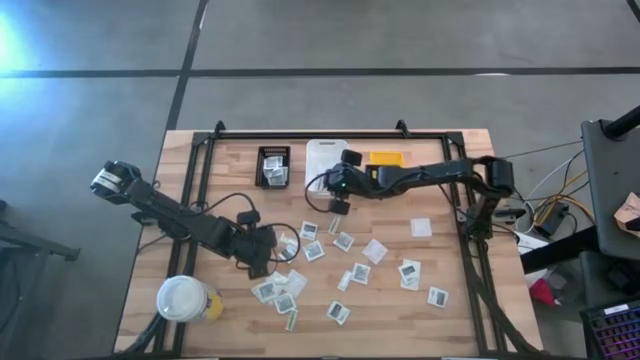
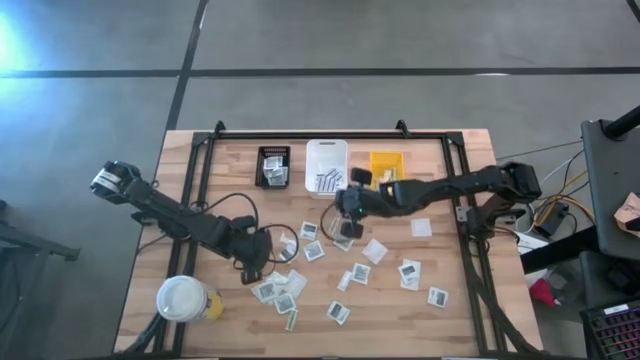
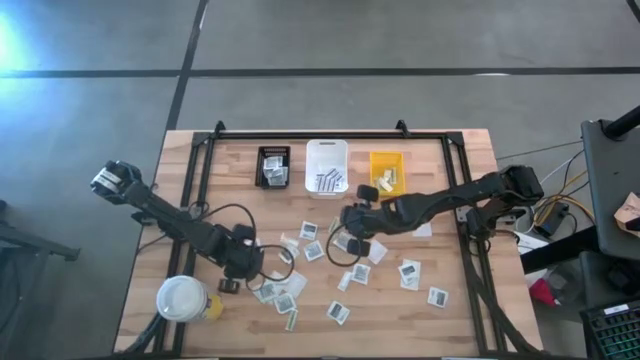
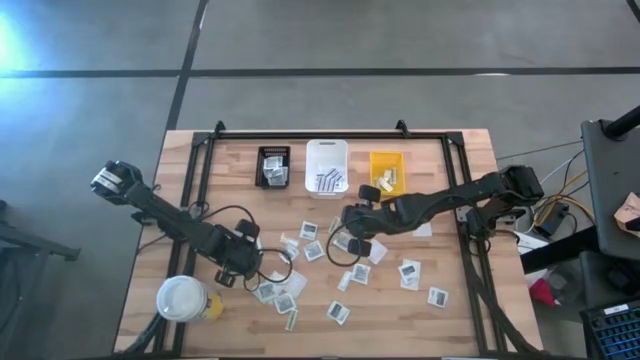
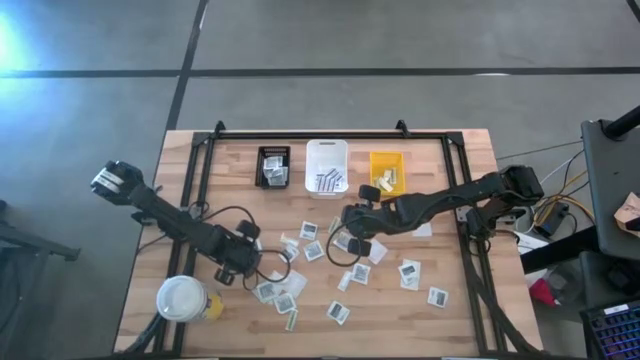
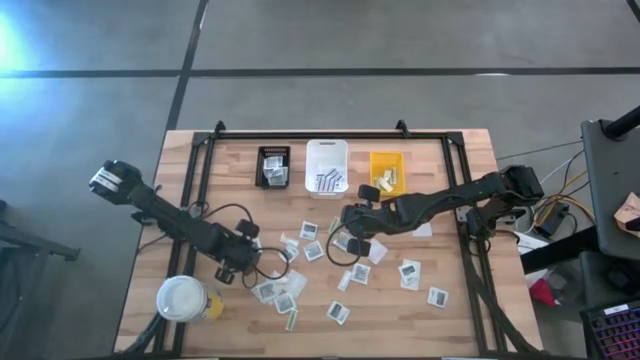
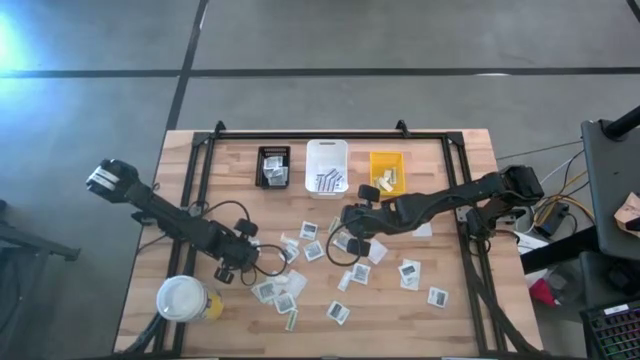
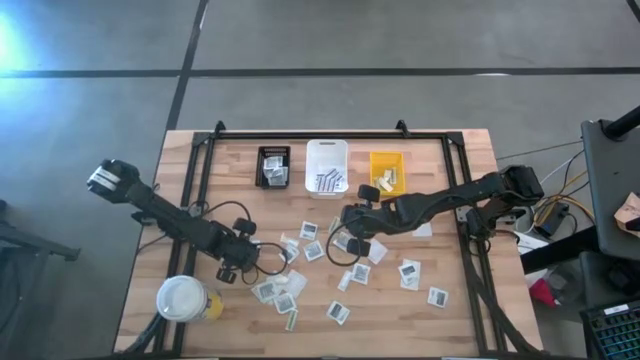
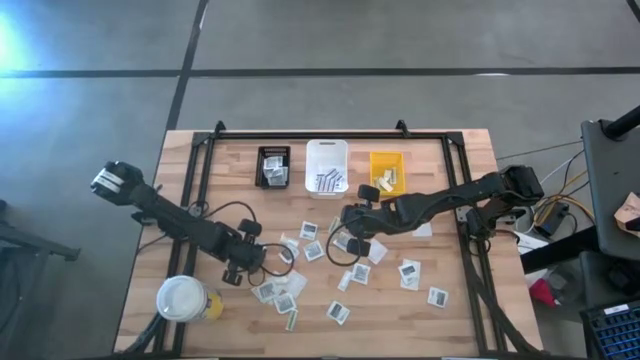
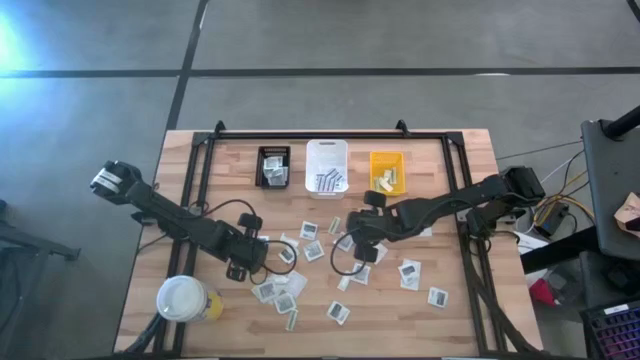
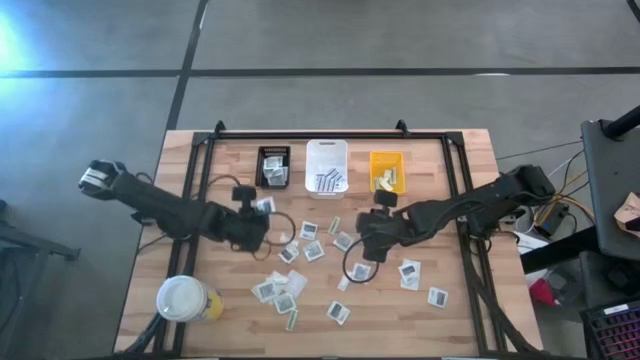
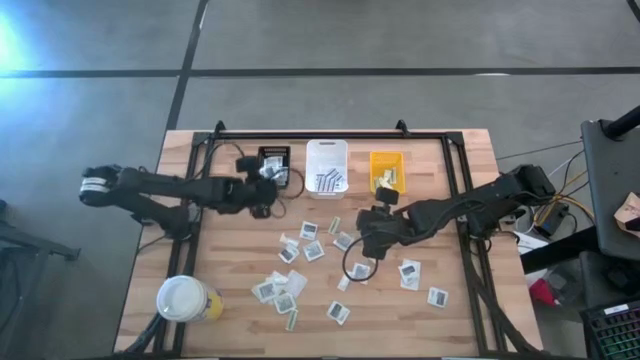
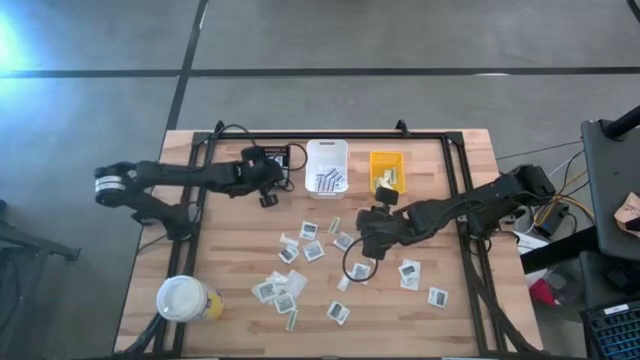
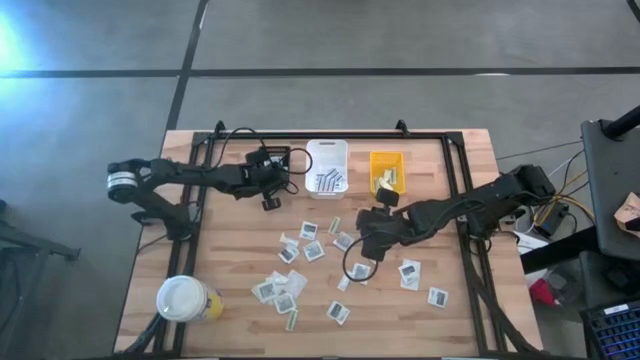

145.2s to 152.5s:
Task: Pick & Place First Aid Supplies
Put the towelette pack into the black basket

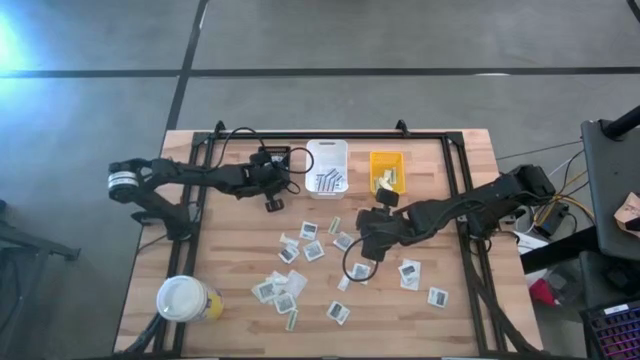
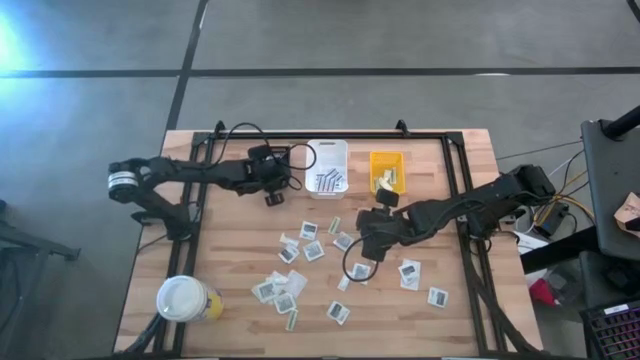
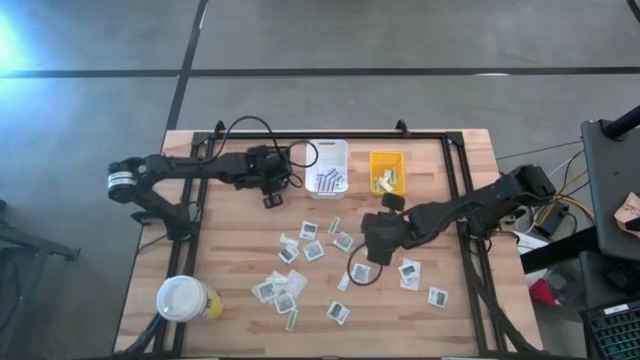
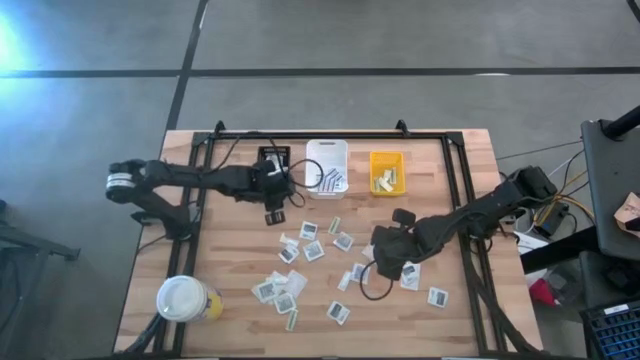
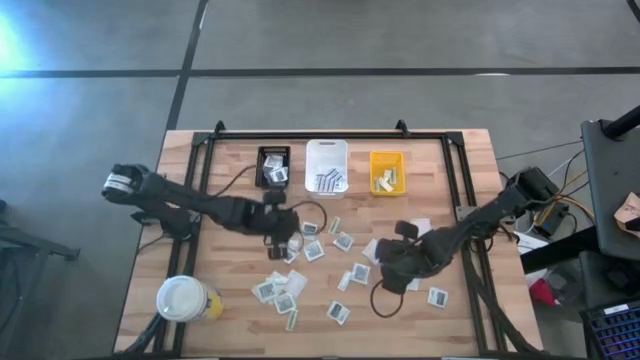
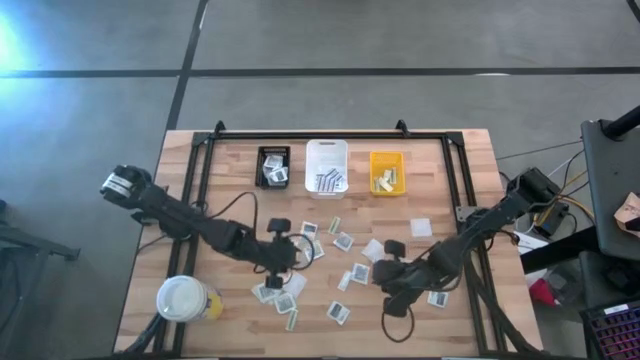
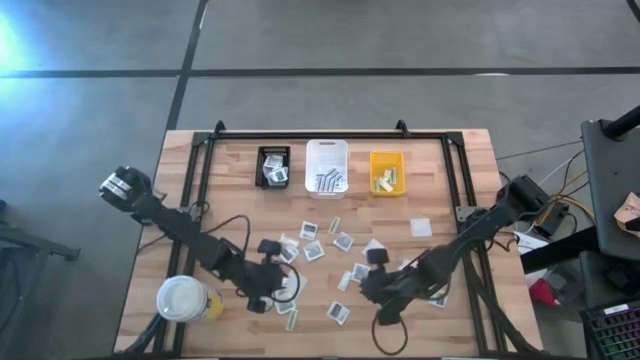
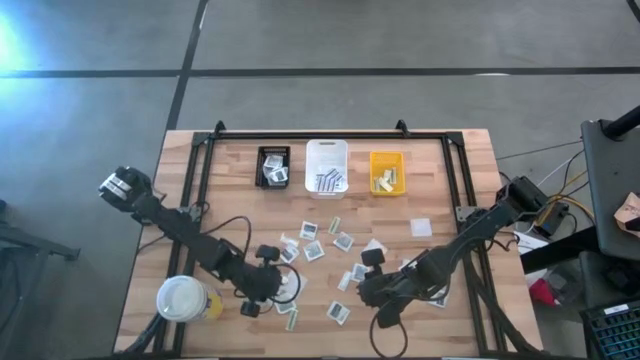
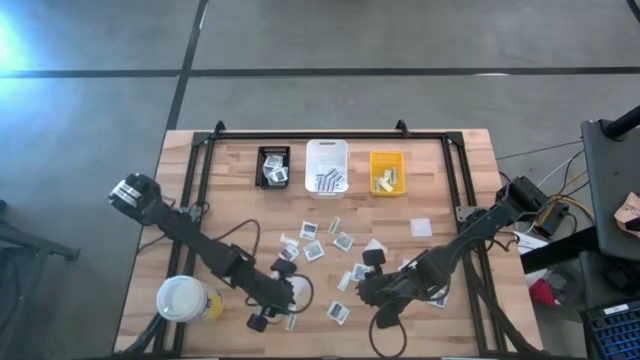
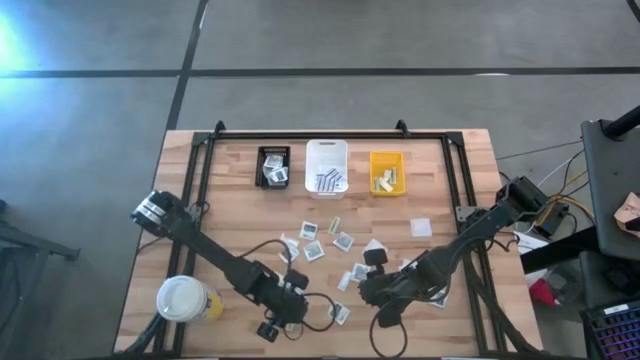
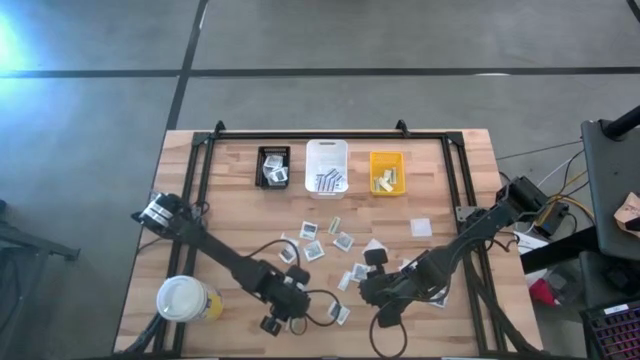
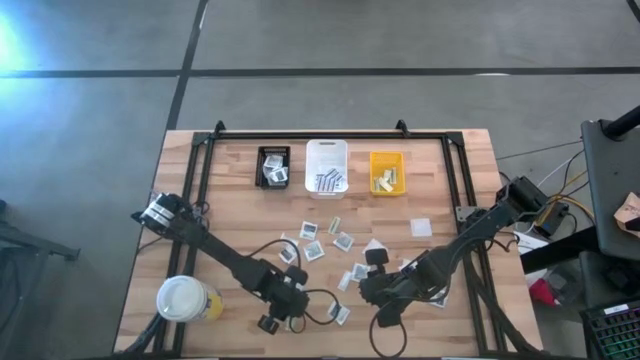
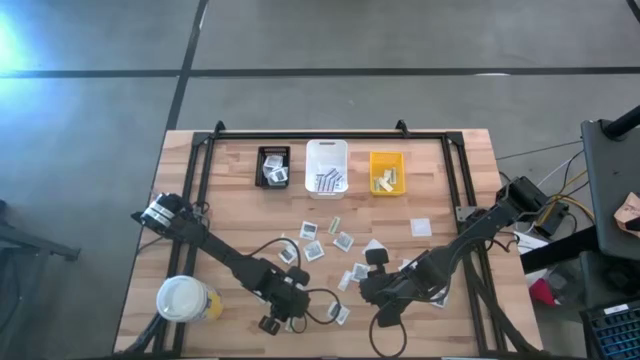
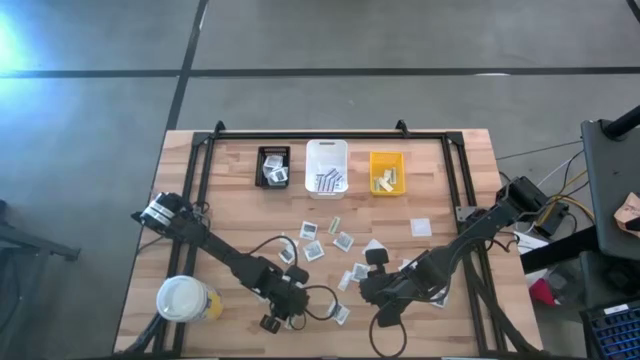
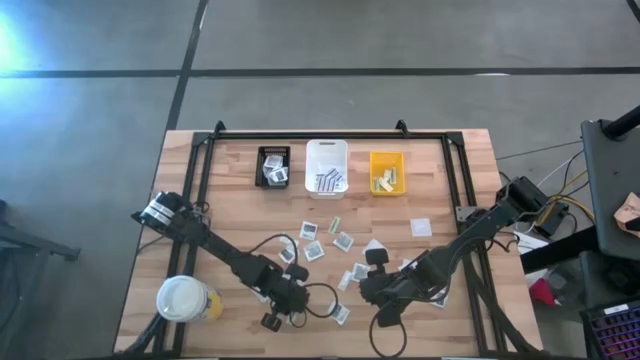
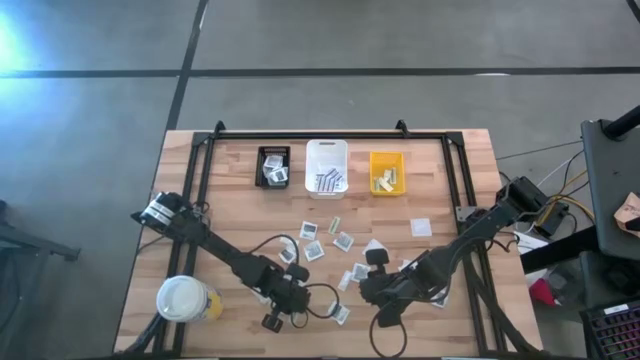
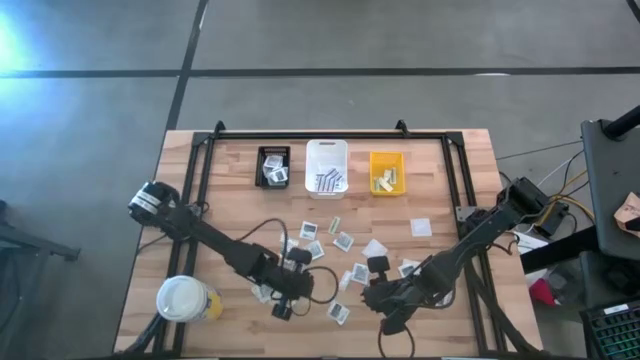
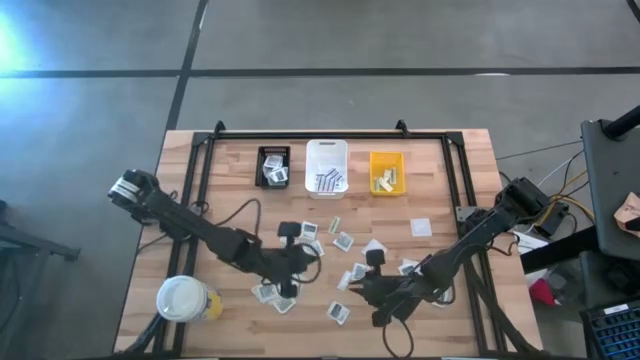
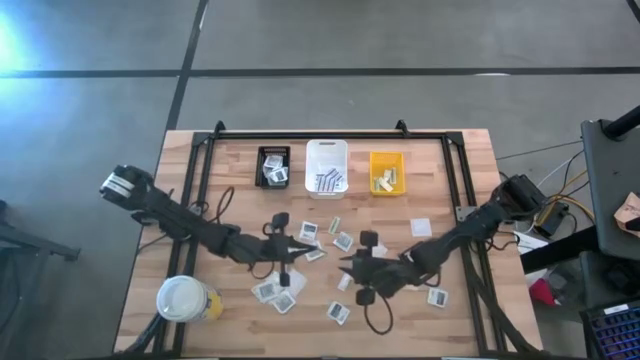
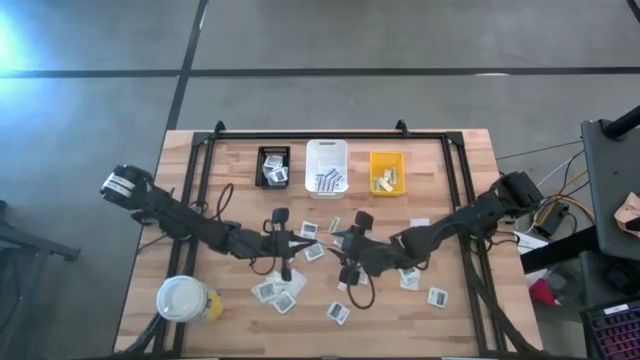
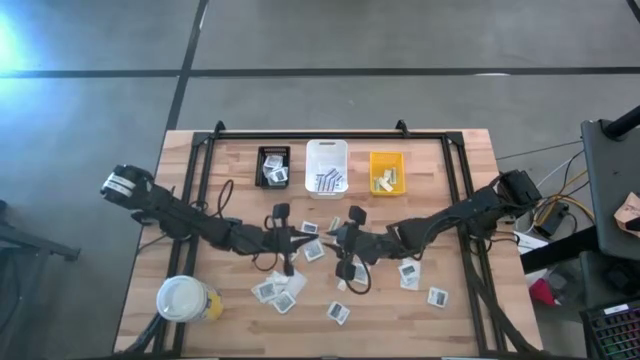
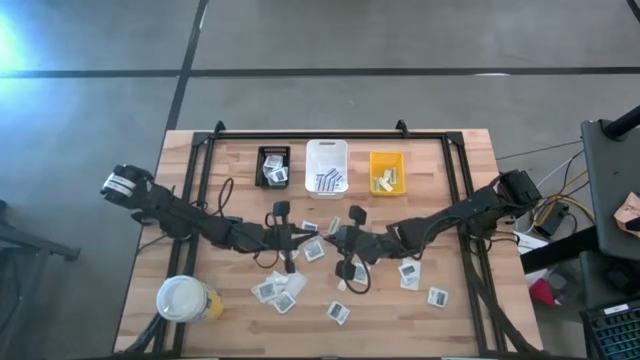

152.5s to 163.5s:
Put the green bandage into the yellow basket

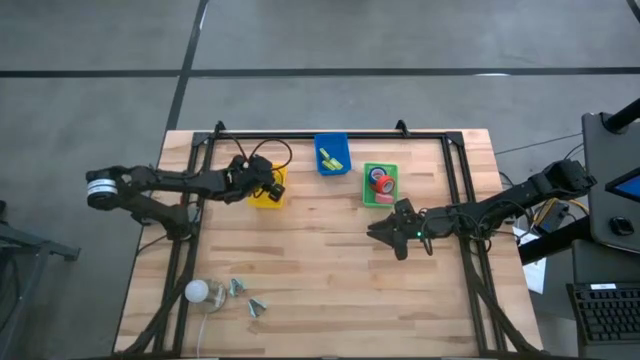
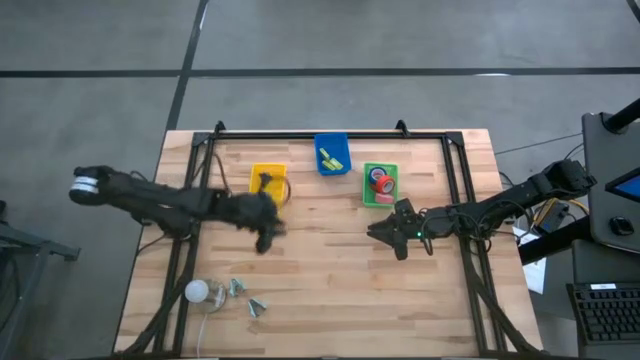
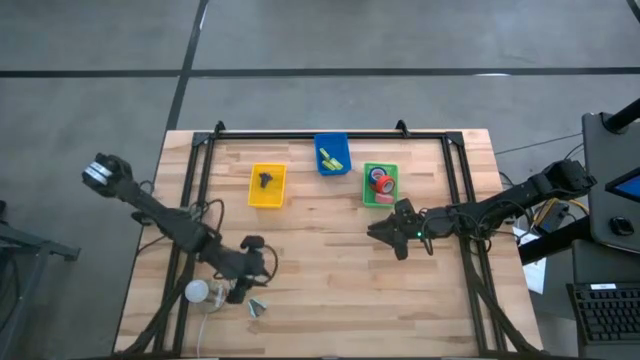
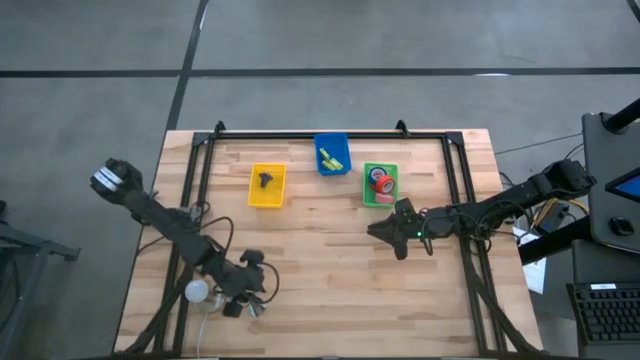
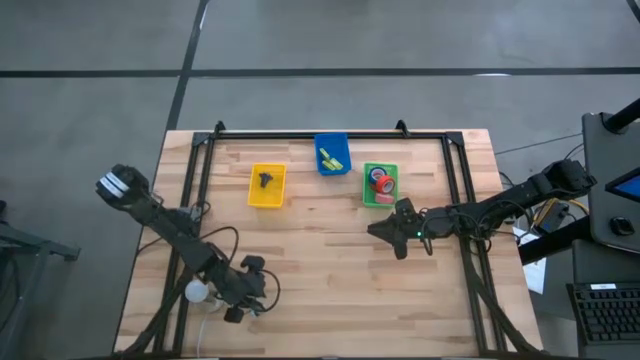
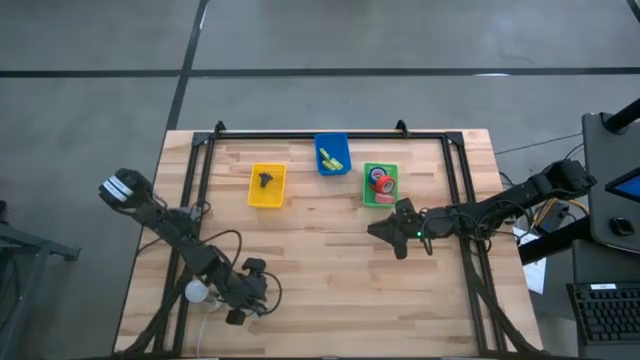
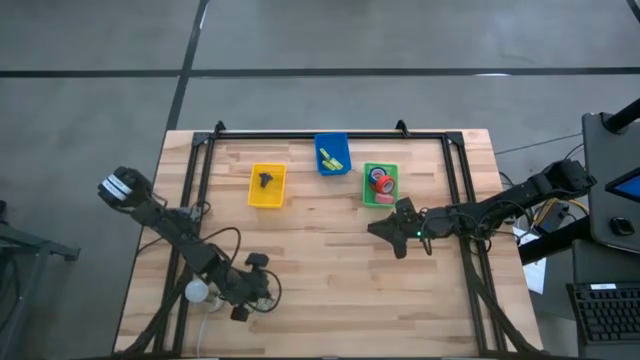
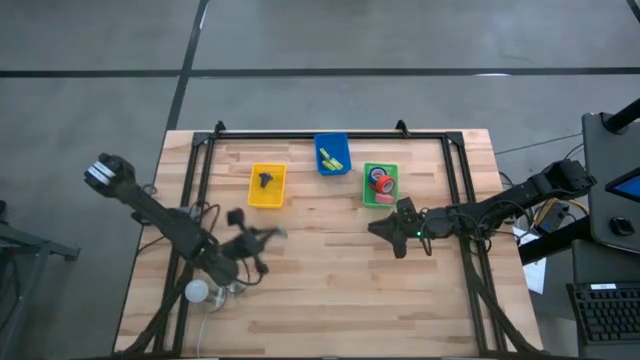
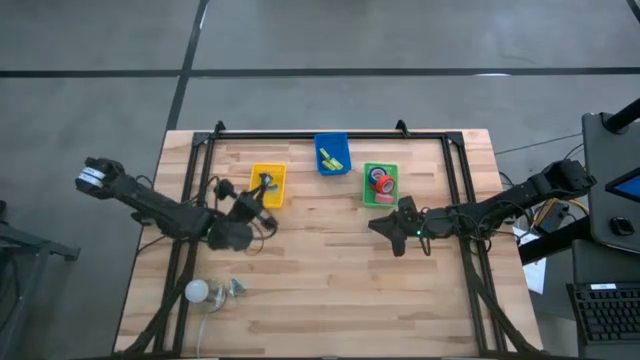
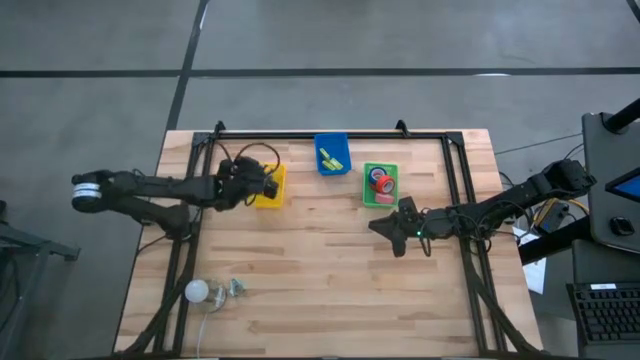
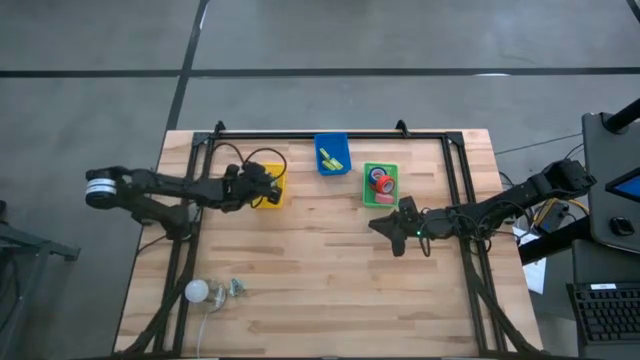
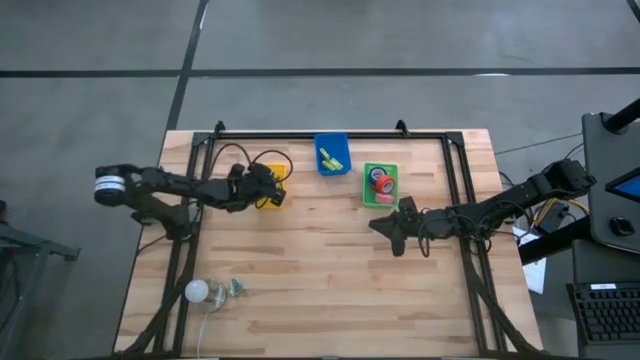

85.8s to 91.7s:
Task: Pick and place Stapler, Stapler remover, tape
Put the bottom light blue staple remover into the yellow basket
